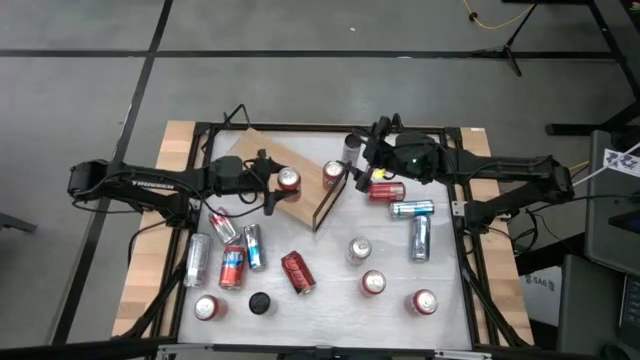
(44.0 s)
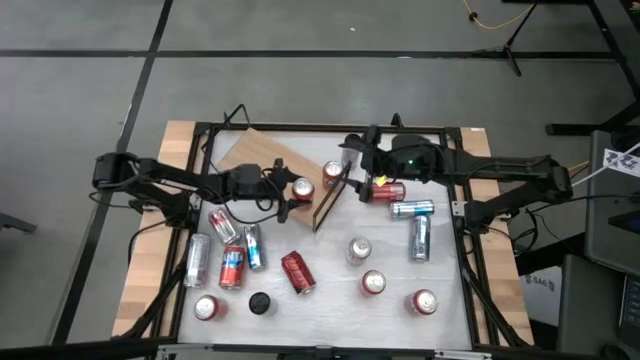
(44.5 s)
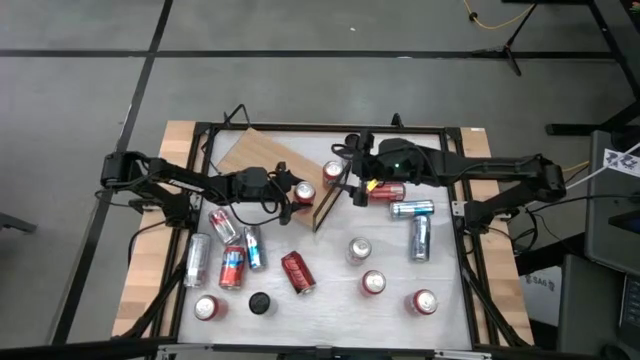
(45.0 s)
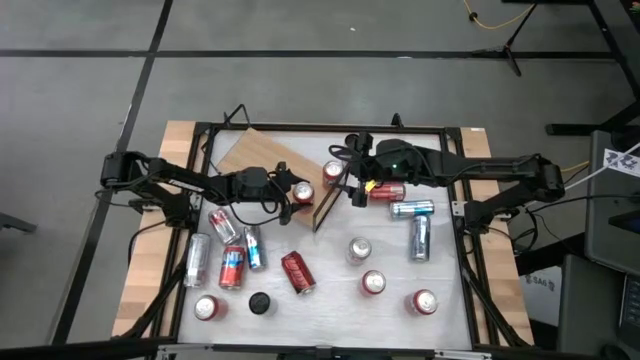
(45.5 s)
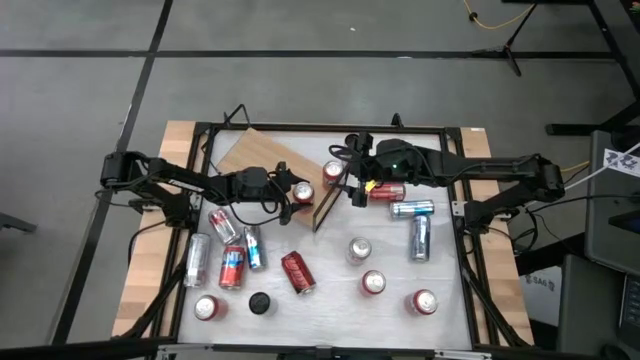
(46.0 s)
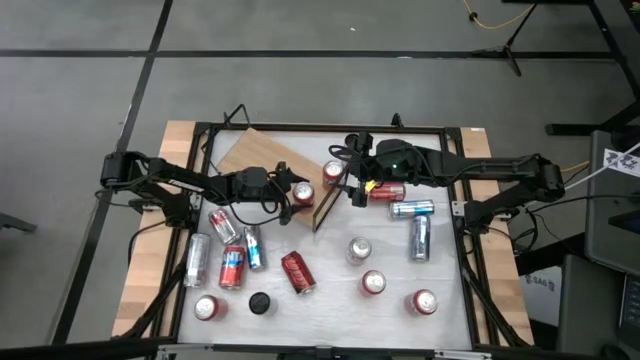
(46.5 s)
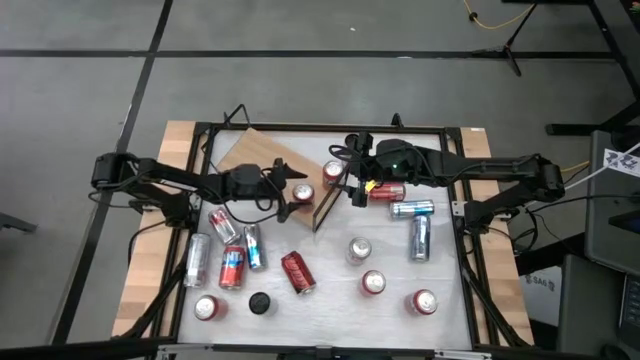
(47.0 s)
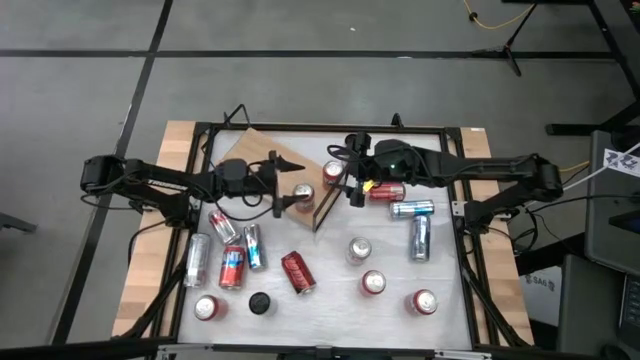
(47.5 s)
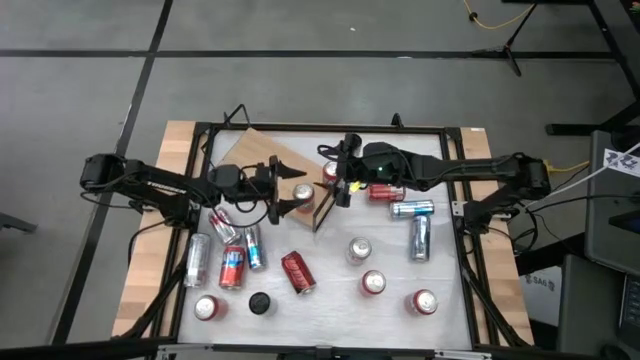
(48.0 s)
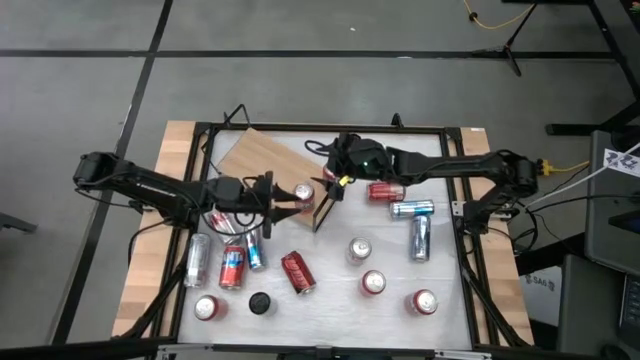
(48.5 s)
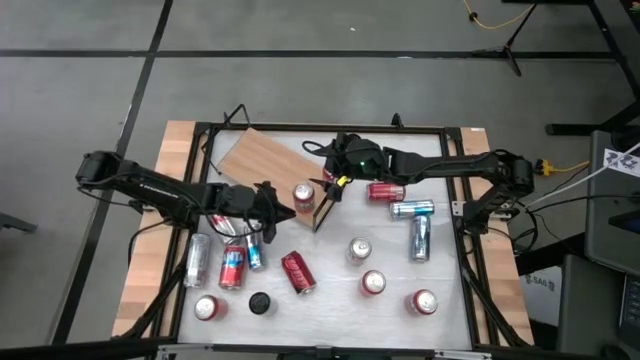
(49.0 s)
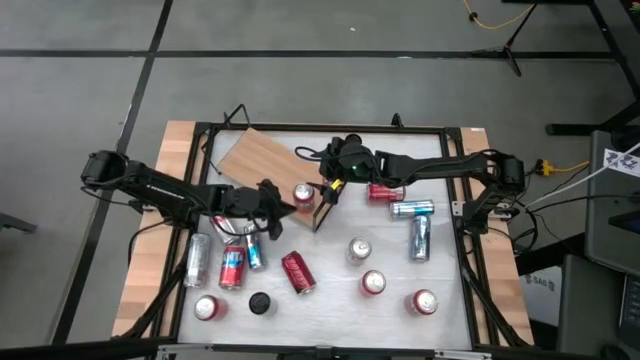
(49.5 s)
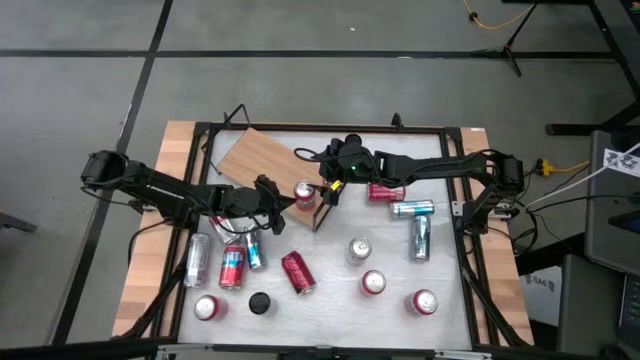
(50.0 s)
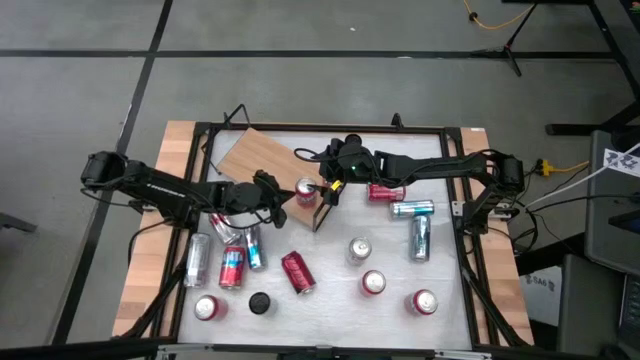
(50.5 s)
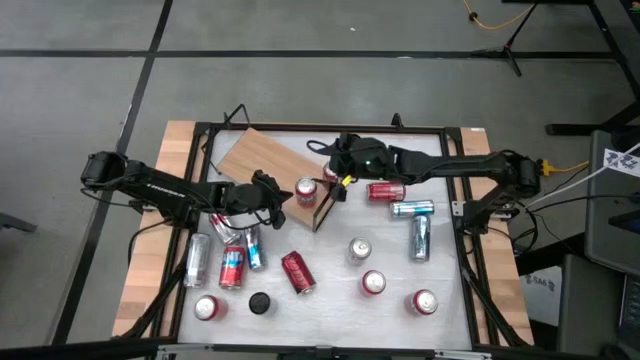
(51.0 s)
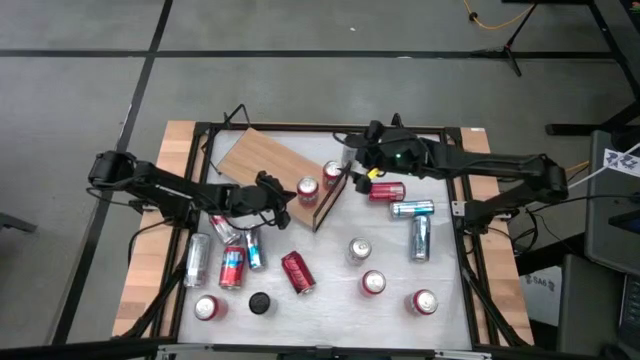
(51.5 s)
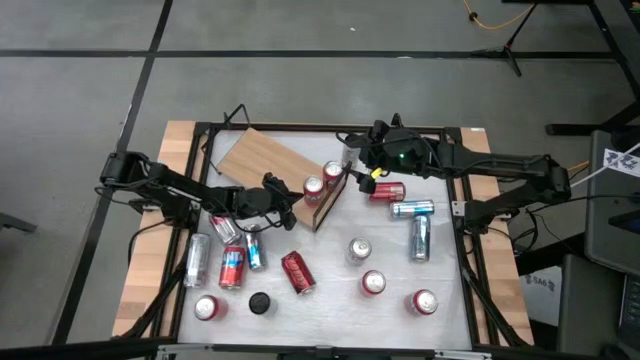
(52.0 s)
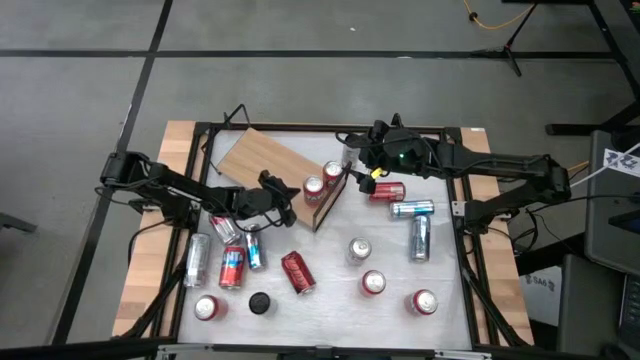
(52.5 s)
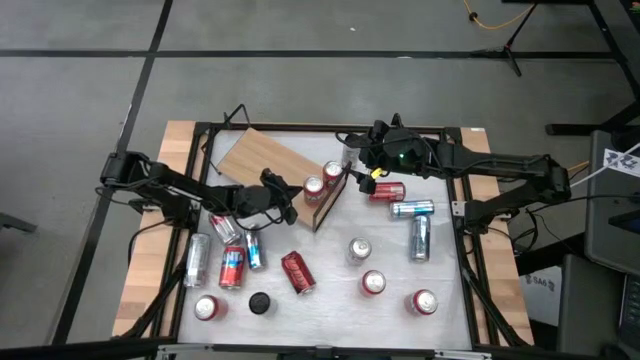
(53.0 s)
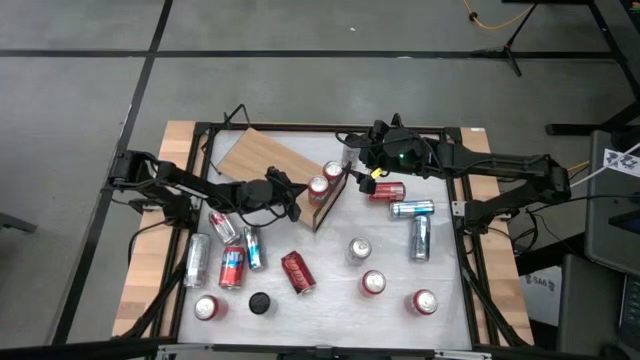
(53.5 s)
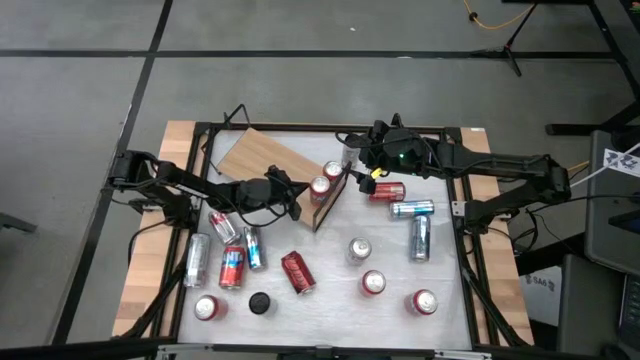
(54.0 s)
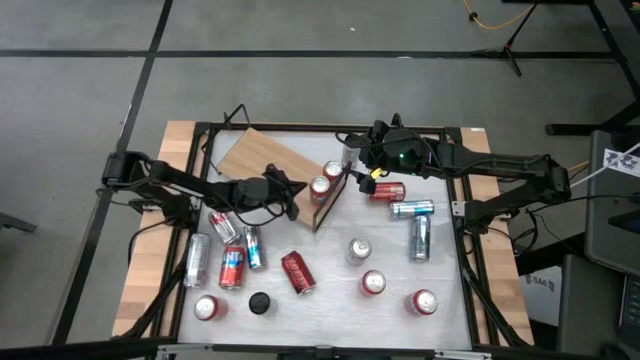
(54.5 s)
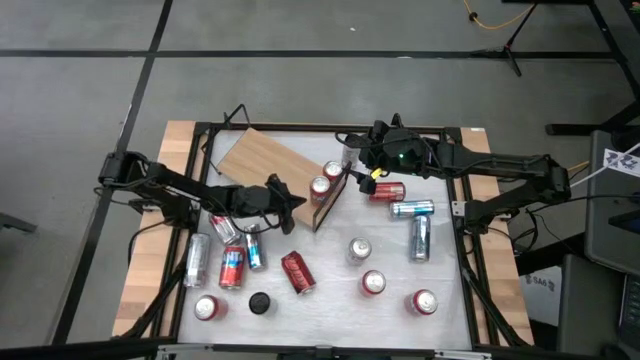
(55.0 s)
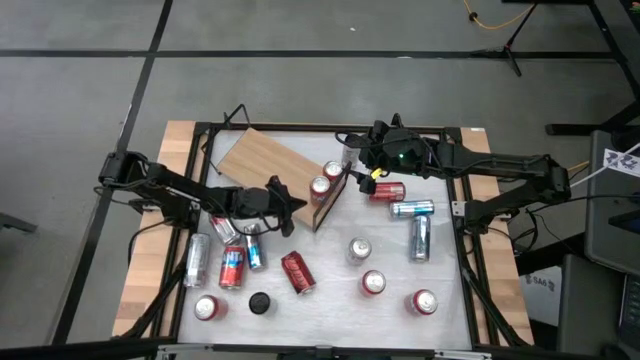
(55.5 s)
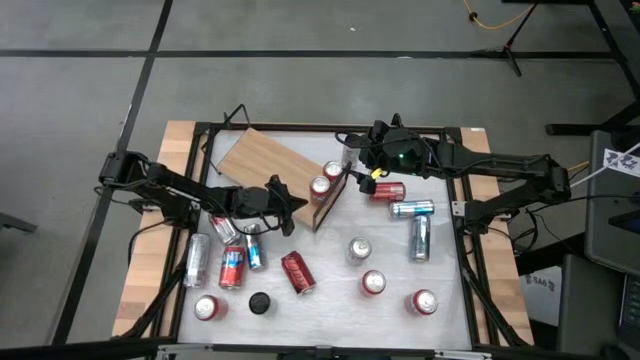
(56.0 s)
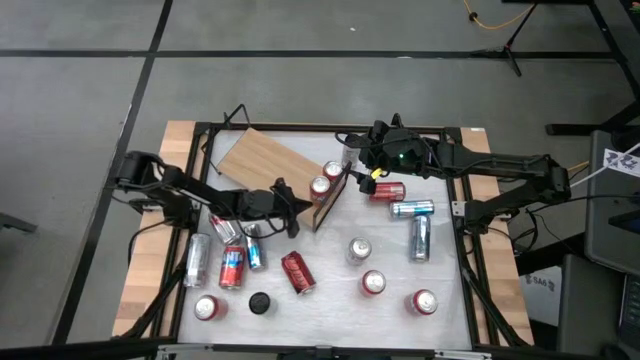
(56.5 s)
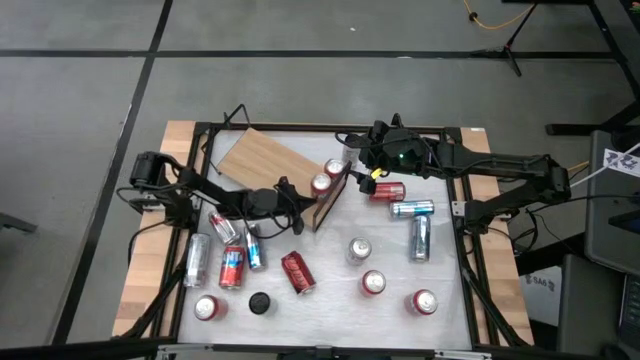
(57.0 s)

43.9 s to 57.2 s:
Task: Pick and place cans onto a shelf
Put the middle right red soda can on the shelf aligned with the other red soda can

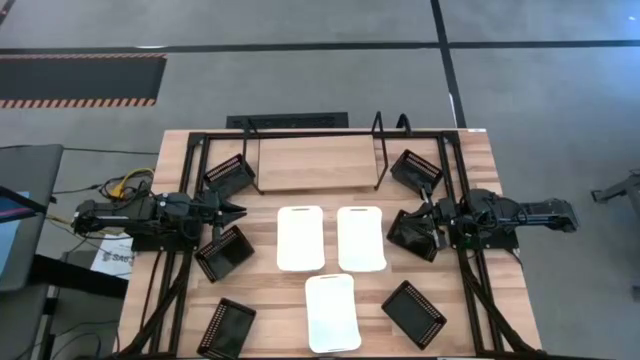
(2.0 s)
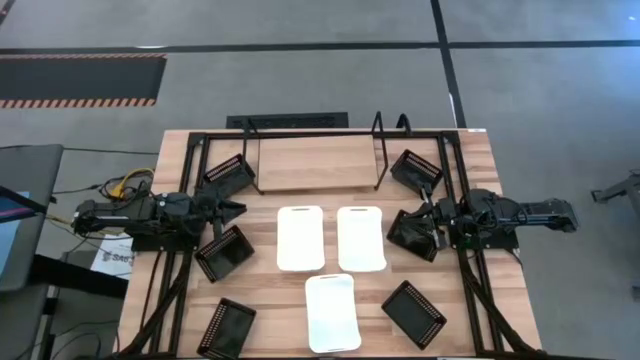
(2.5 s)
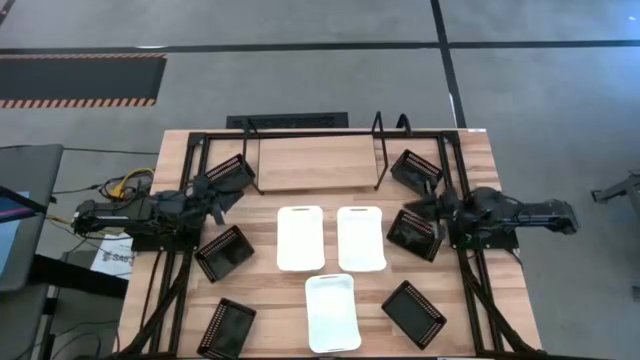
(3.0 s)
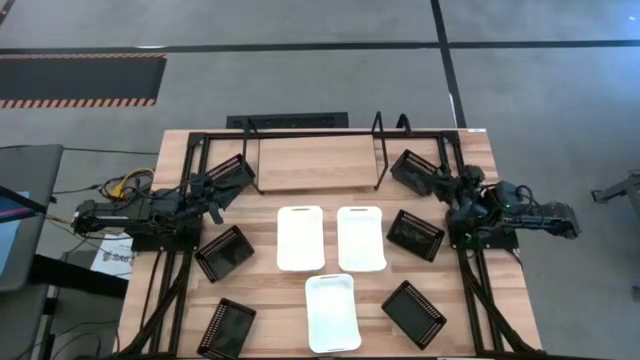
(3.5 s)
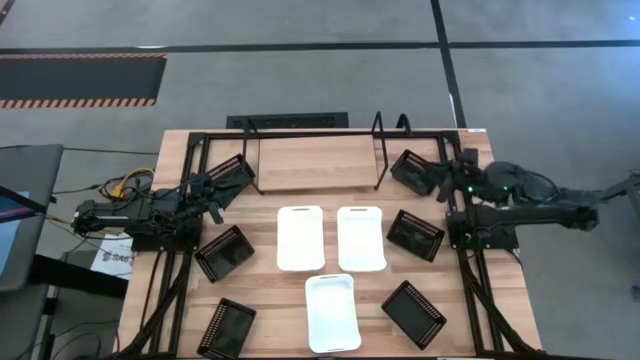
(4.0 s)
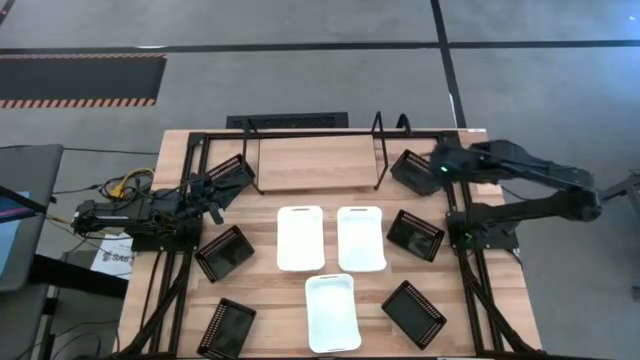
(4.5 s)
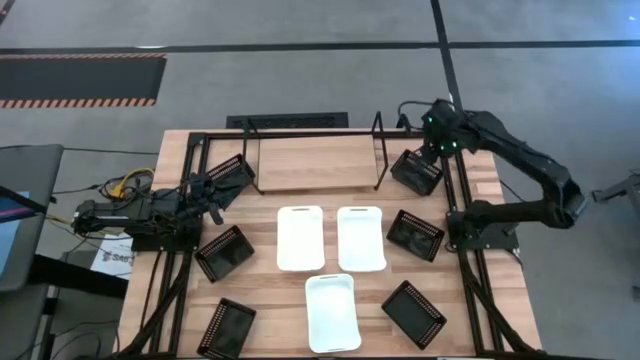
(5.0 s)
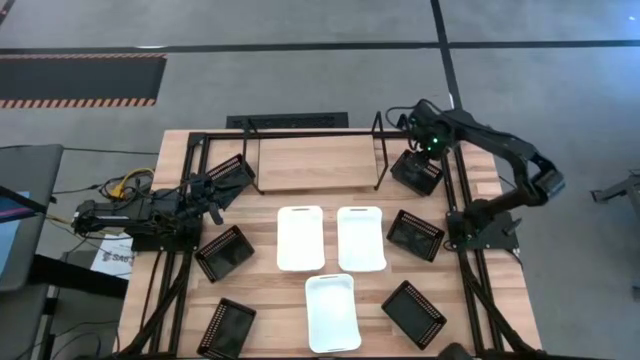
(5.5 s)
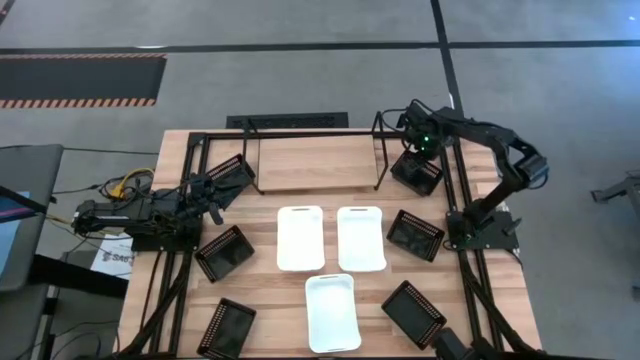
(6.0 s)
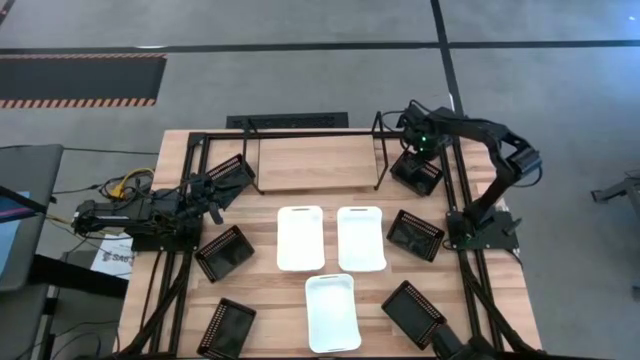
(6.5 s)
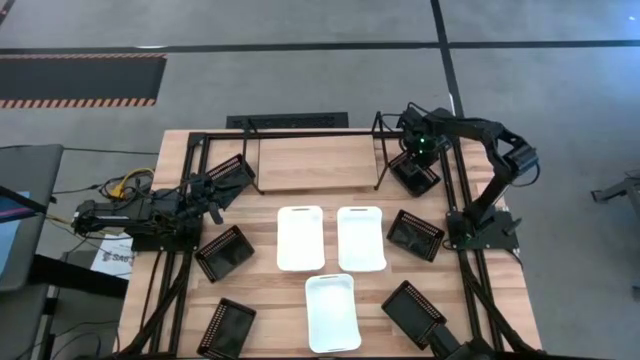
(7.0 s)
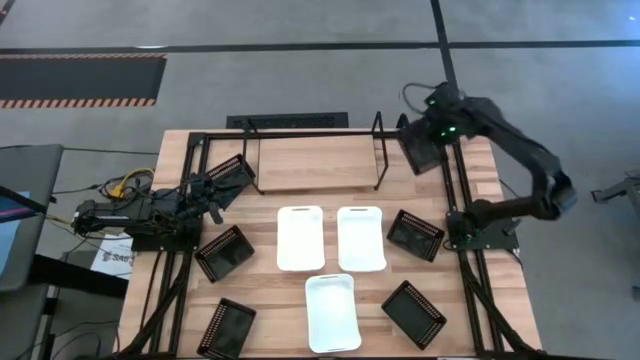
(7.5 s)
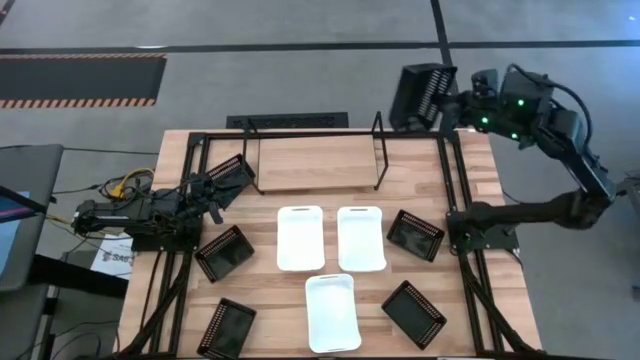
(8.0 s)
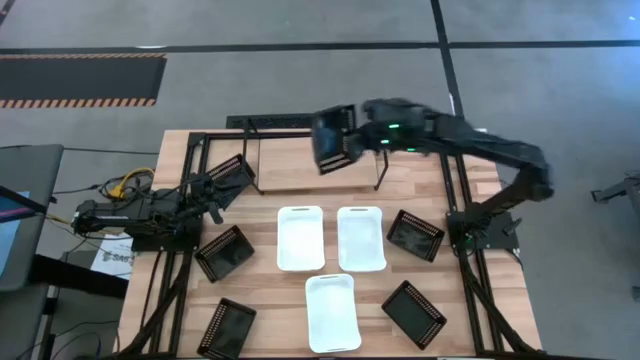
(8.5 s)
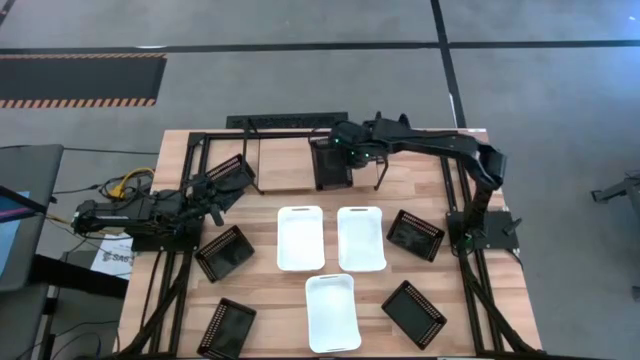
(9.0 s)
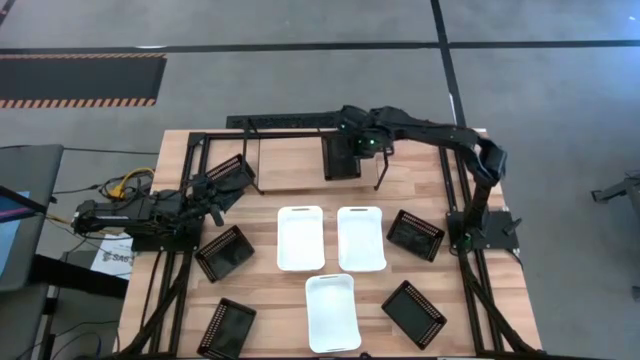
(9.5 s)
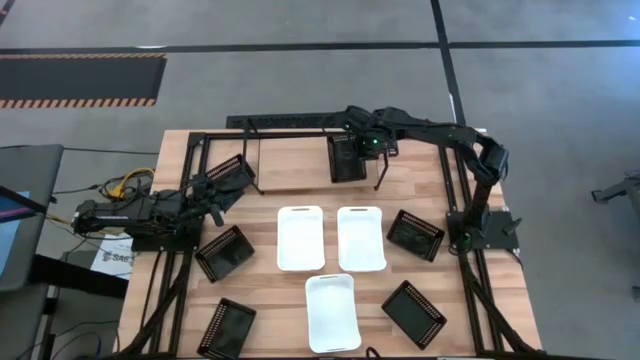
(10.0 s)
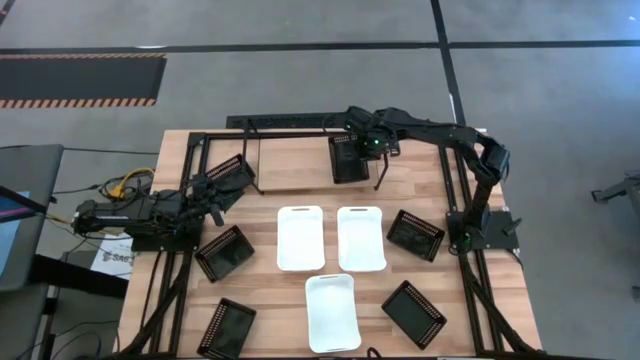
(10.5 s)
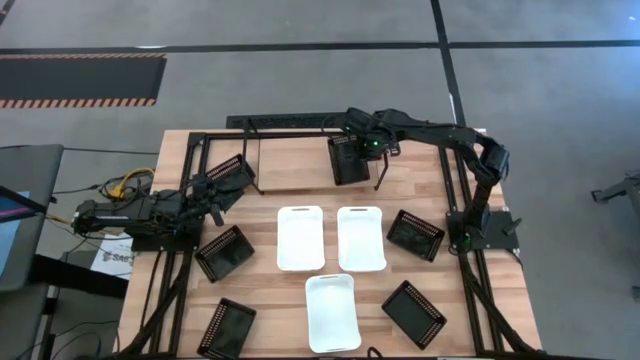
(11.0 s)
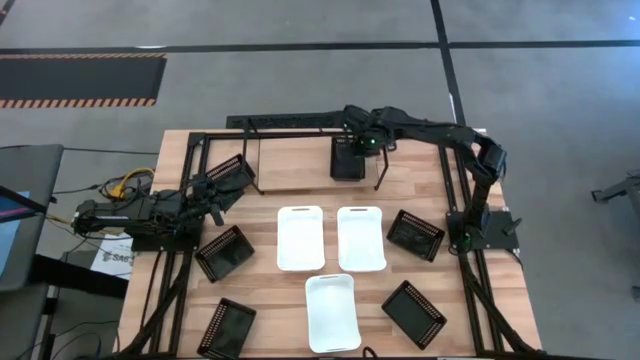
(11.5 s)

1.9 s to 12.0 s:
Task: Stack baskets on shelf by color
Put the black bin on the shelf
